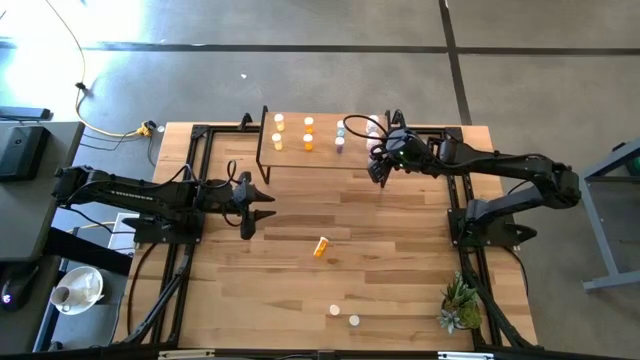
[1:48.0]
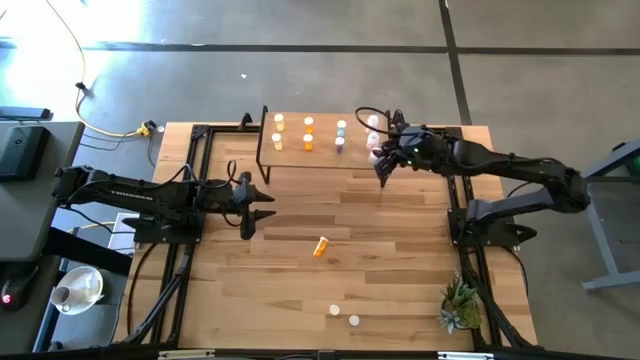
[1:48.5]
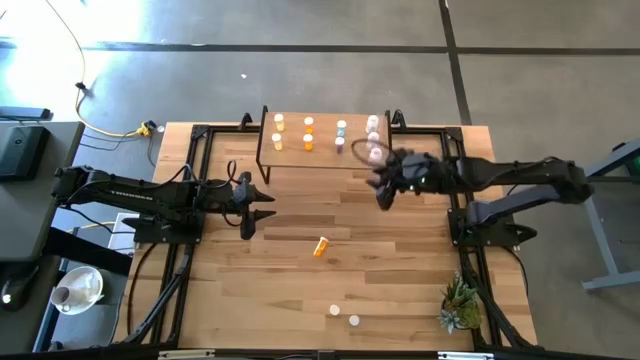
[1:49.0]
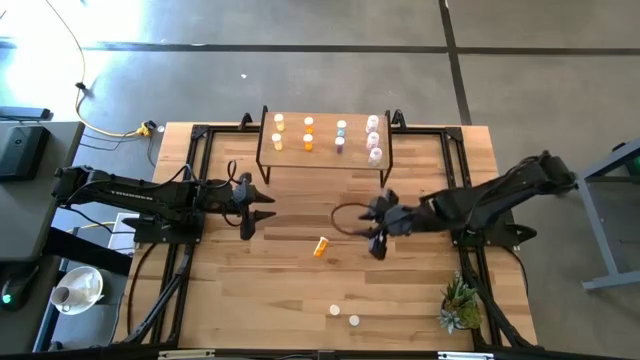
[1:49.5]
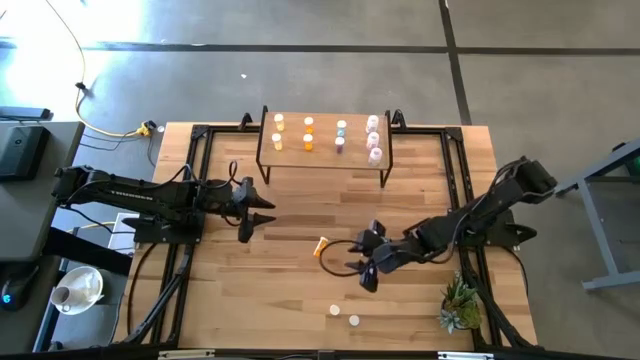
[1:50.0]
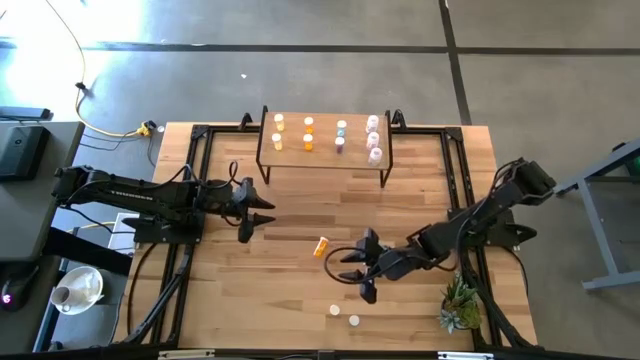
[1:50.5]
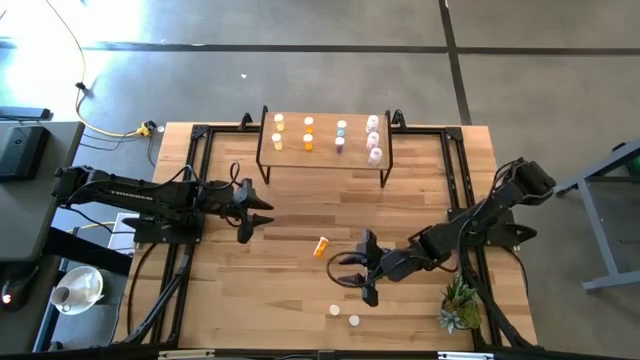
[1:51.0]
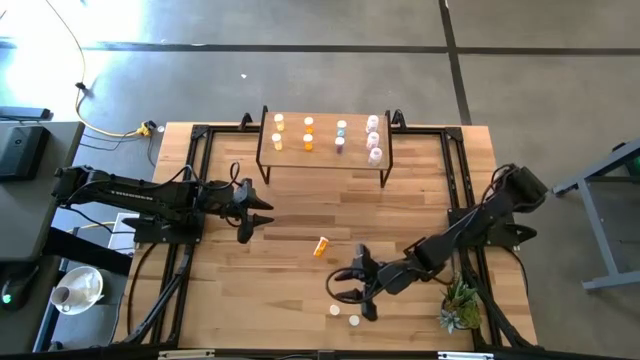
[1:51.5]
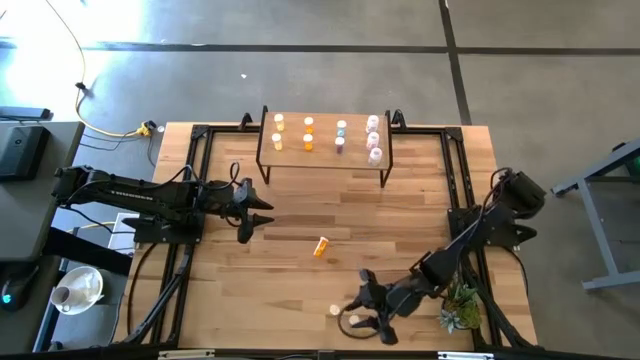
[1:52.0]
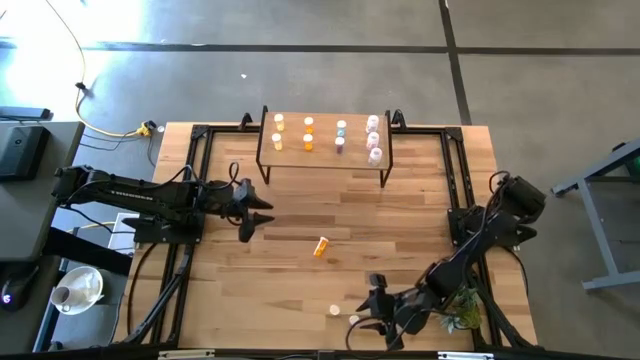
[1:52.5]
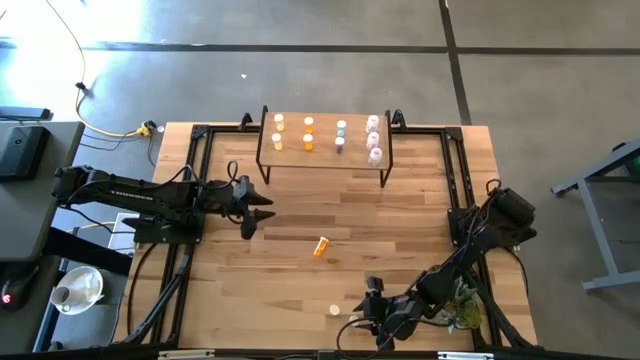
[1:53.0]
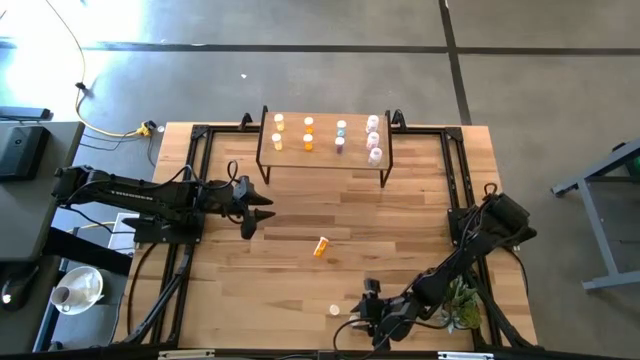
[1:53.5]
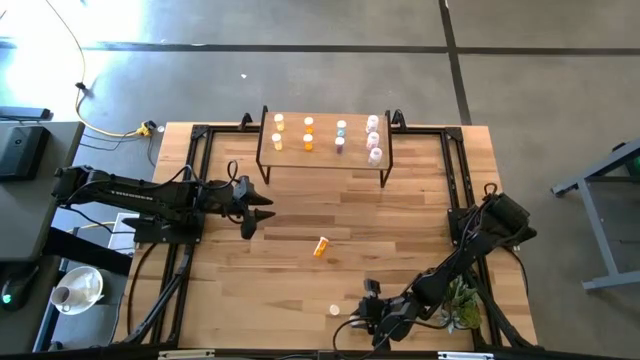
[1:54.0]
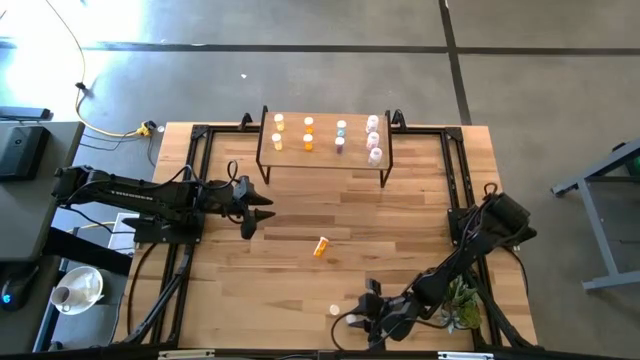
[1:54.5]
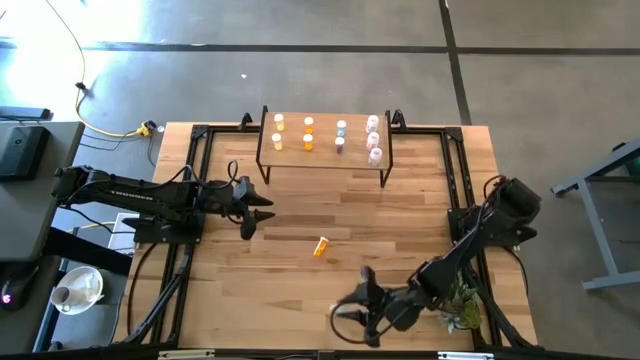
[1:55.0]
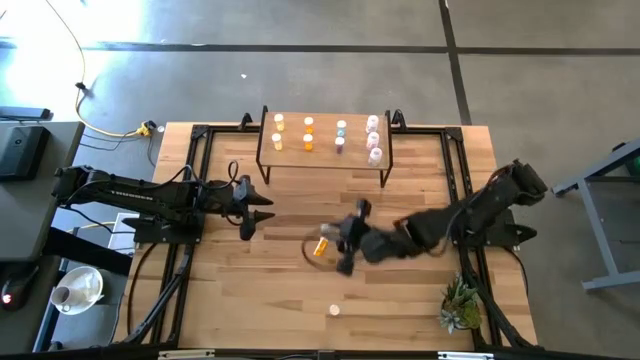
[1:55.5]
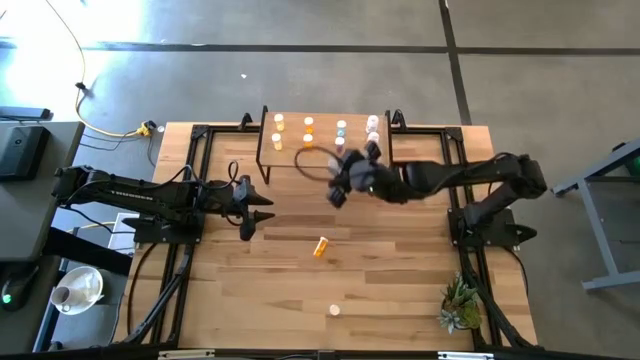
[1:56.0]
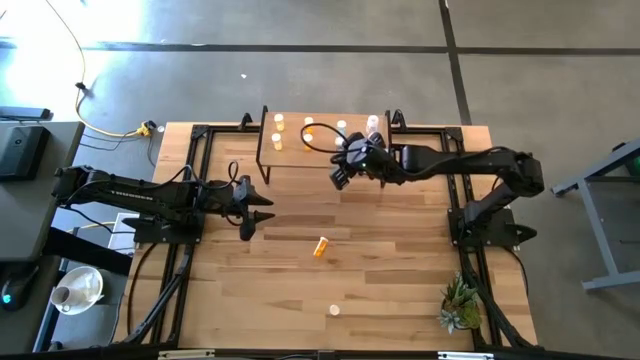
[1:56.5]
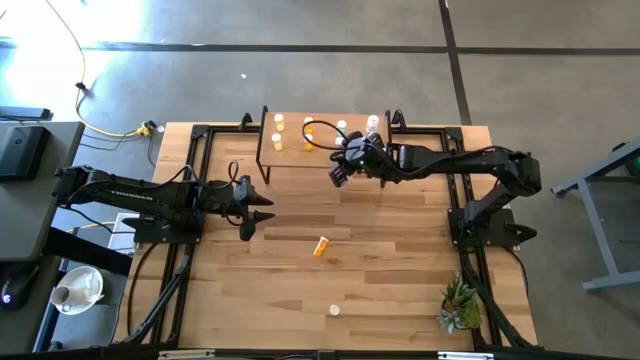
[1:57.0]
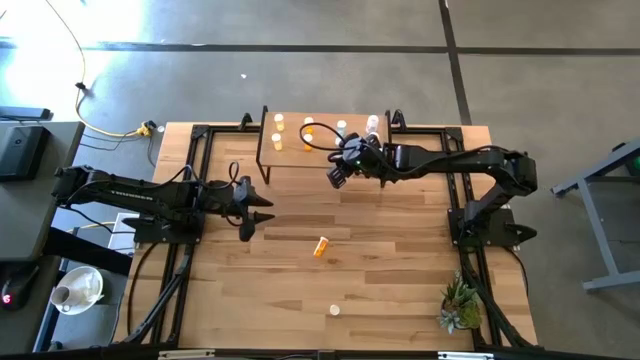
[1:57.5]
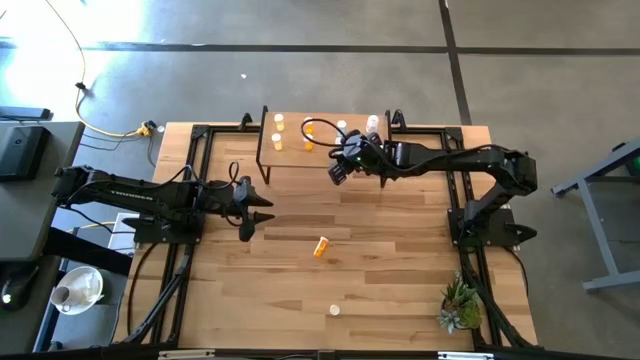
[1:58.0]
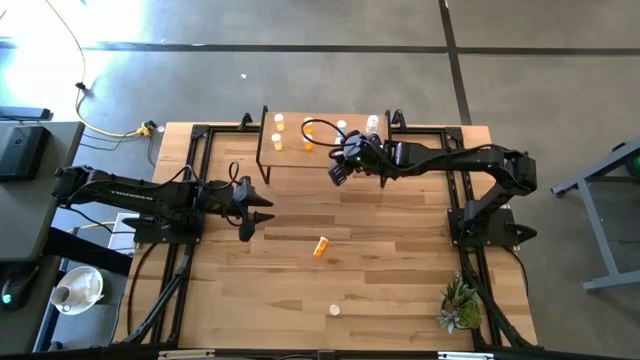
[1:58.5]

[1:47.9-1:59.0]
Task: Pick and place medicine bottles onto shelf by color
Put the blue pill bottle on the shelf aligned with the blue pill bottles

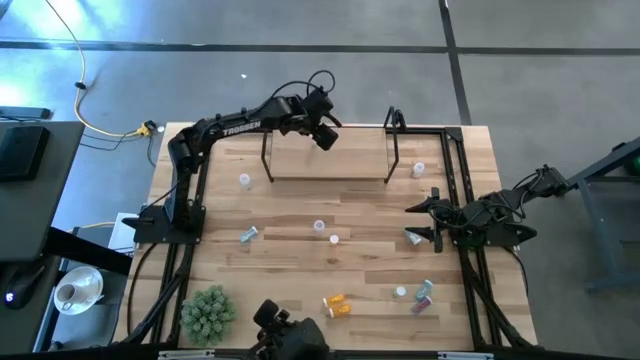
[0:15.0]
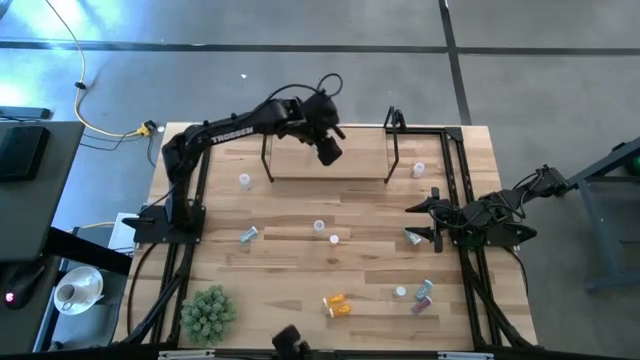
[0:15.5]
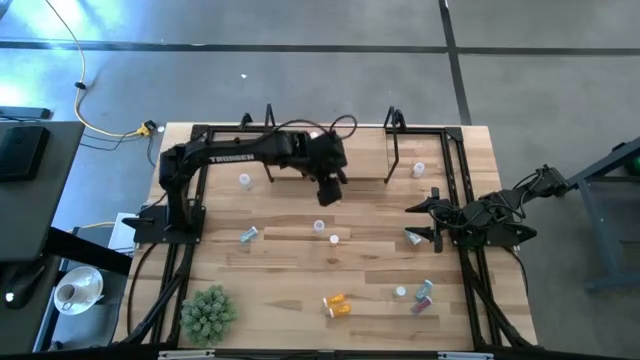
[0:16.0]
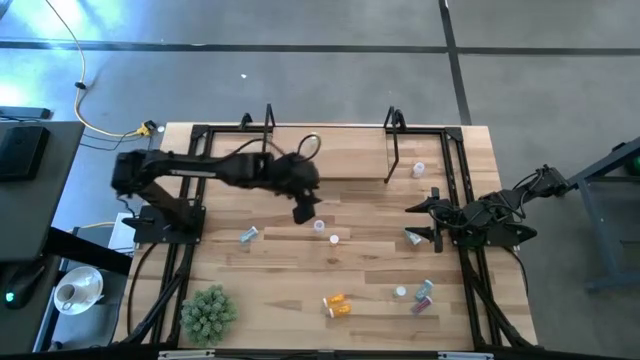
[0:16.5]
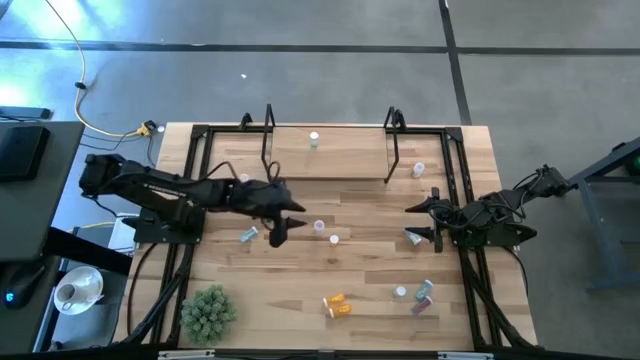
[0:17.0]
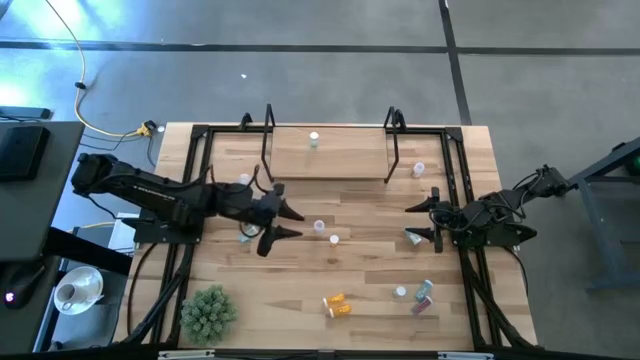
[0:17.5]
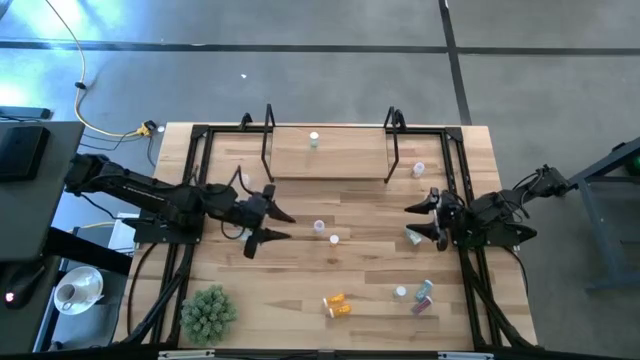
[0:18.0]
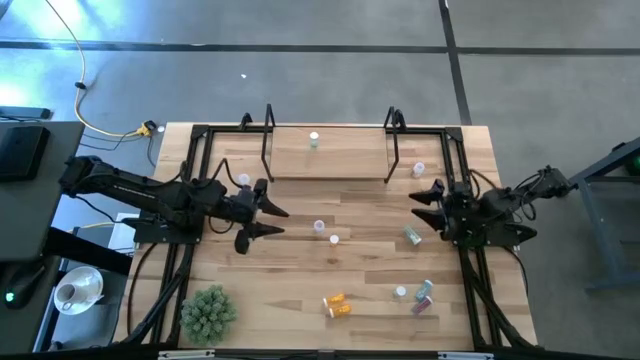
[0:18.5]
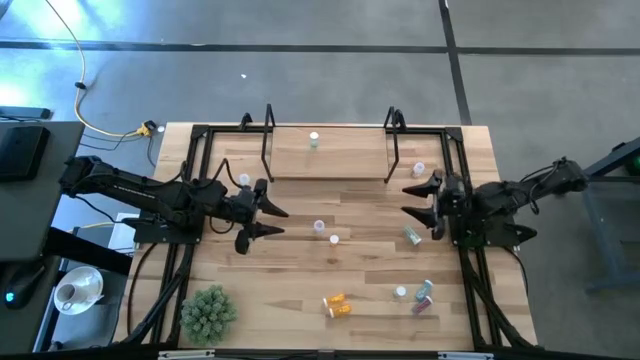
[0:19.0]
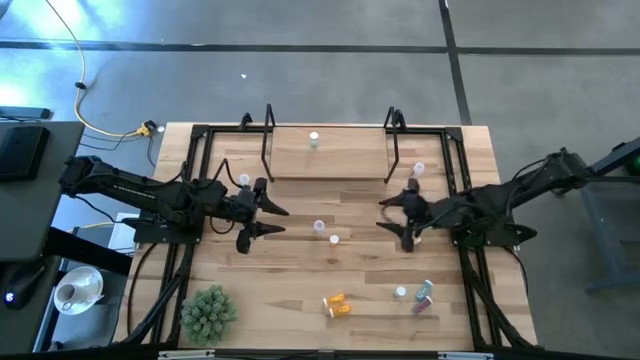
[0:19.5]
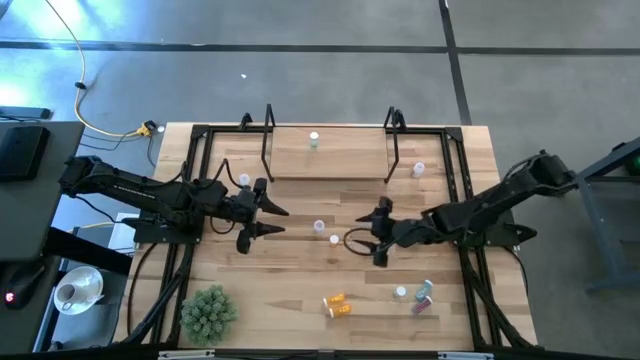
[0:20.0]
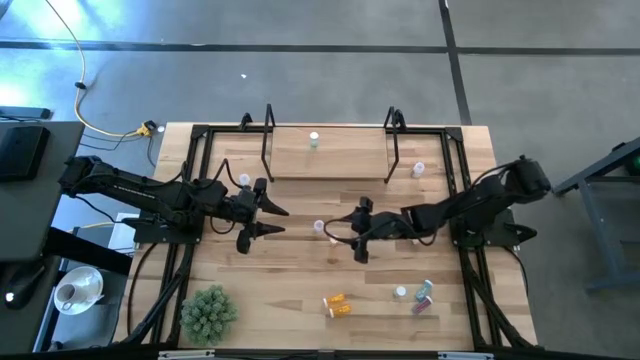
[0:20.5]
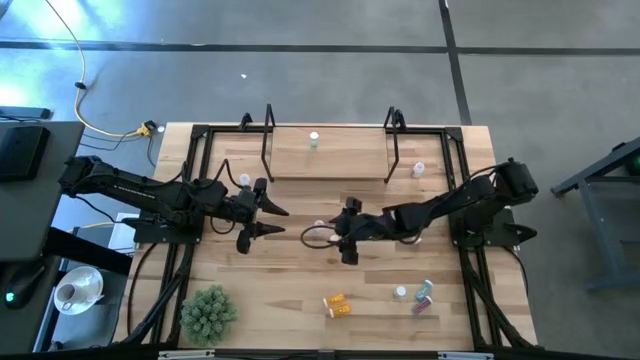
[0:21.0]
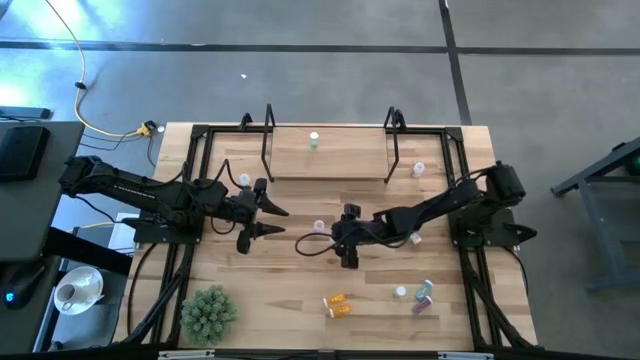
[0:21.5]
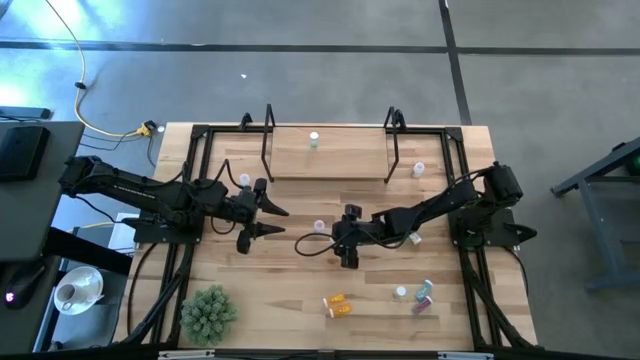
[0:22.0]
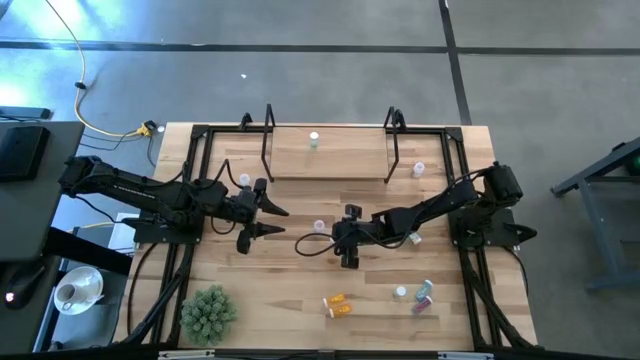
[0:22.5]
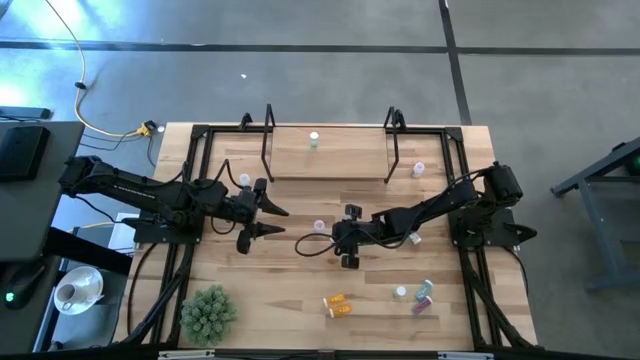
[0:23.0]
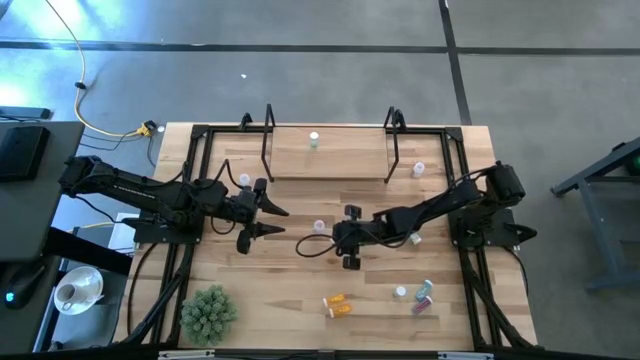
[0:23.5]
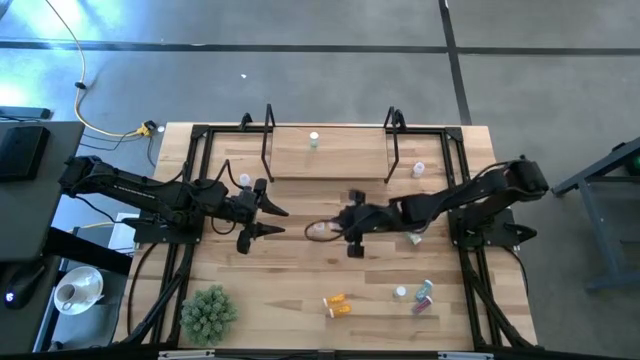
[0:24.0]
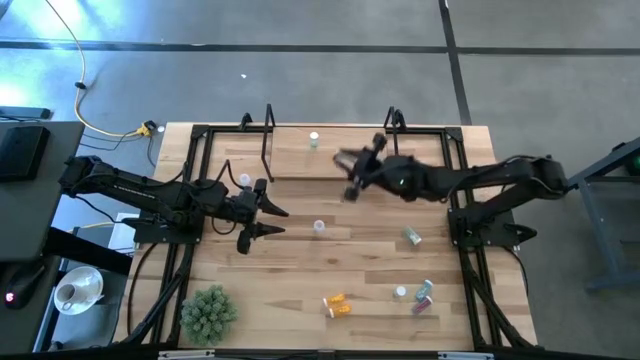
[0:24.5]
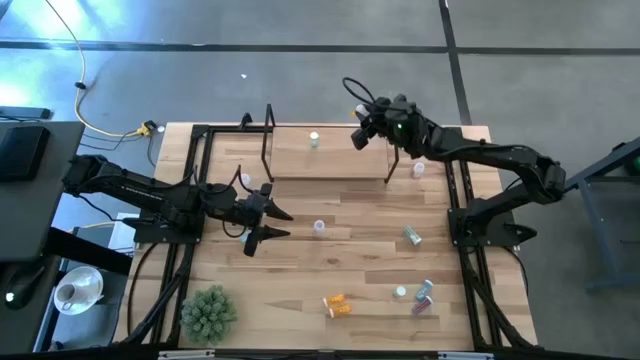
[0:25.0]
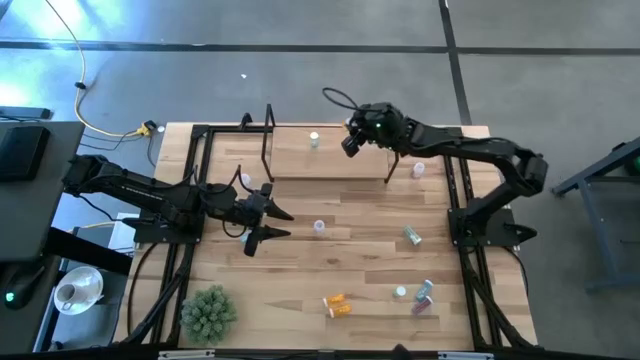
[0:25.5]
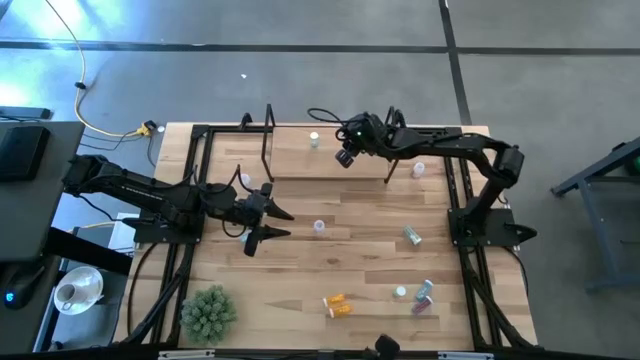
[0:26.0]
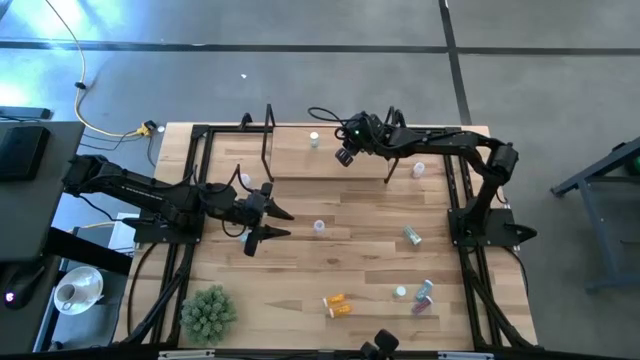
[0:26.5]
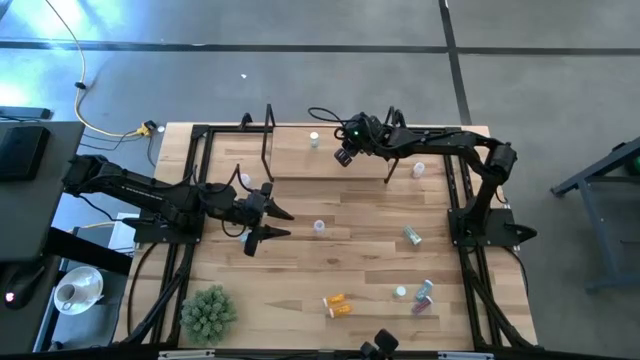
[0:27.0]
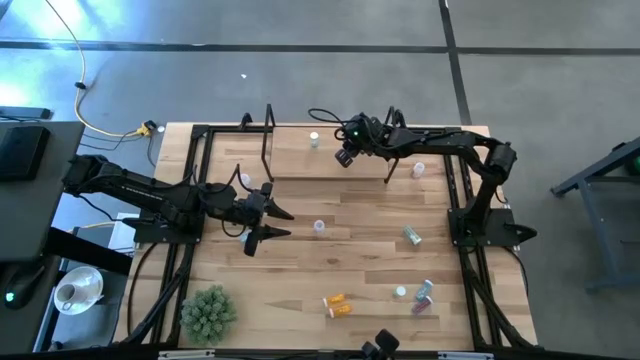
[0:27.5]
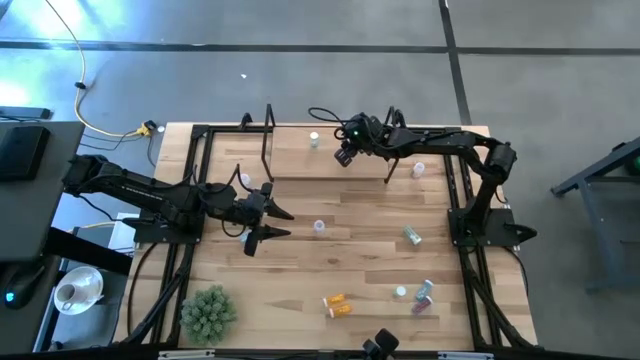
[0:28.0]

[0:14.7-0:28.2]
Task: Pick and place medicine bottles onto shelf by color
Put the top orange pill bottle on the shelf
